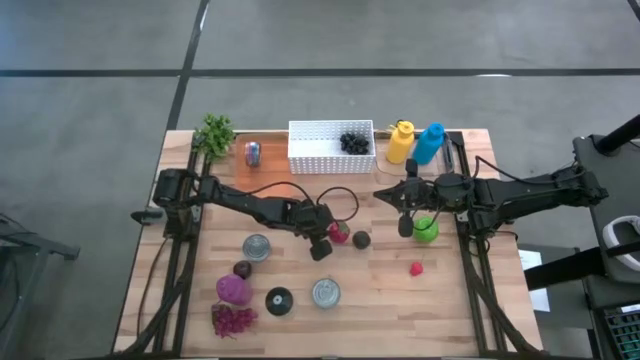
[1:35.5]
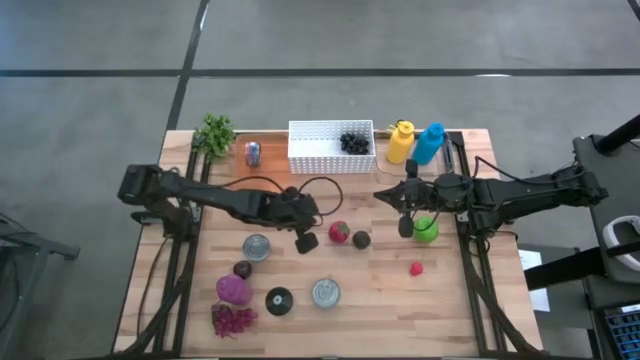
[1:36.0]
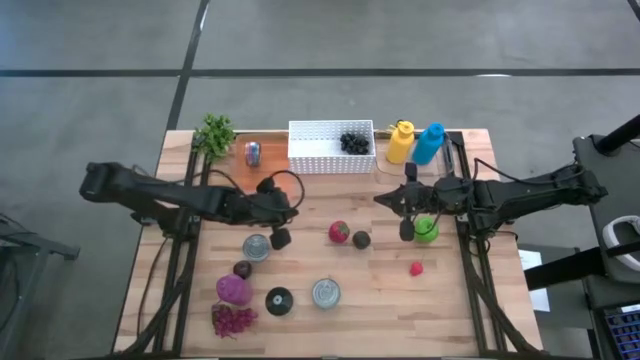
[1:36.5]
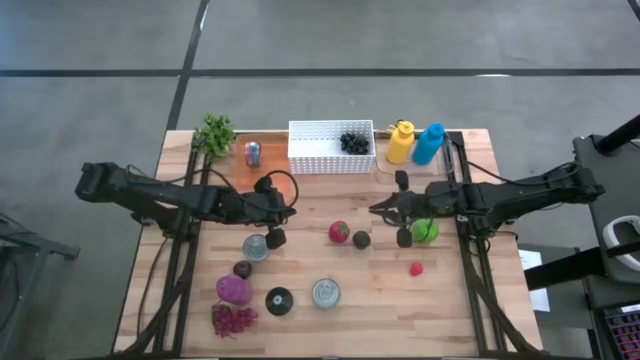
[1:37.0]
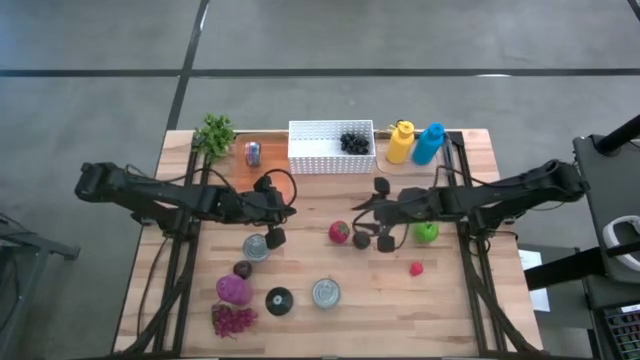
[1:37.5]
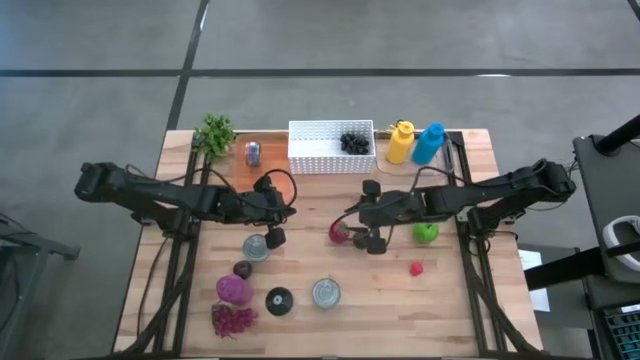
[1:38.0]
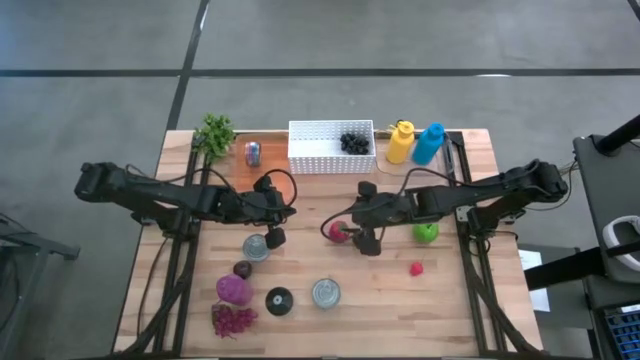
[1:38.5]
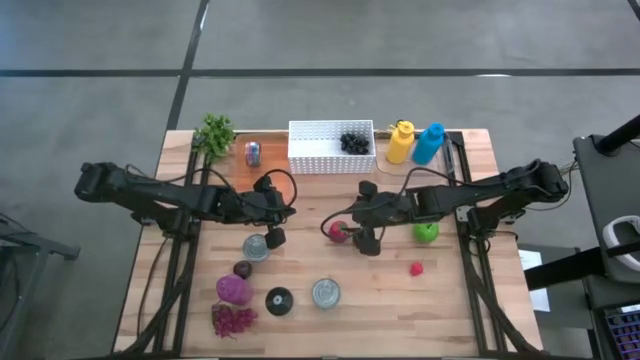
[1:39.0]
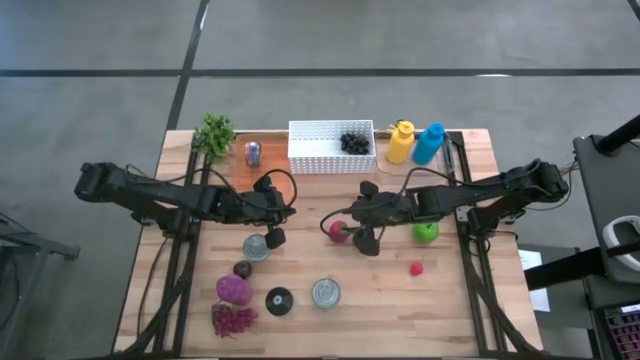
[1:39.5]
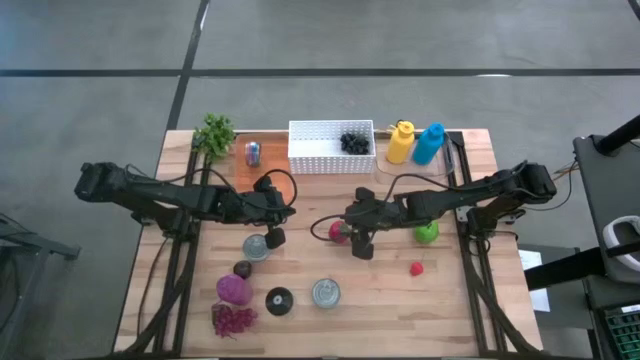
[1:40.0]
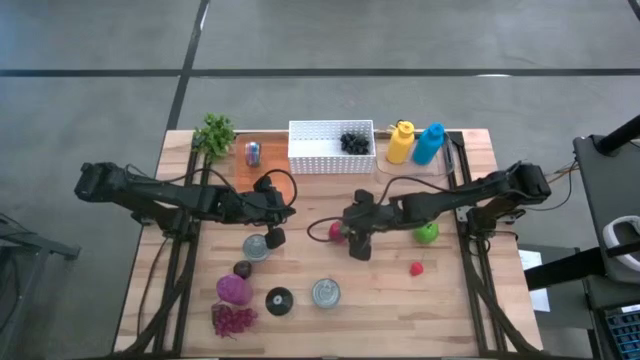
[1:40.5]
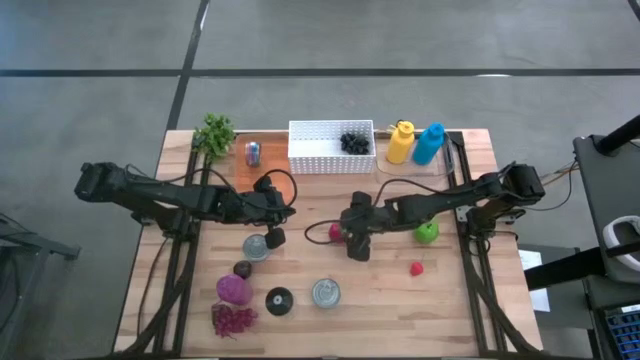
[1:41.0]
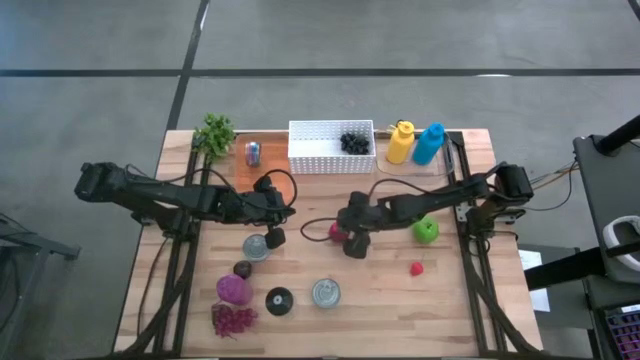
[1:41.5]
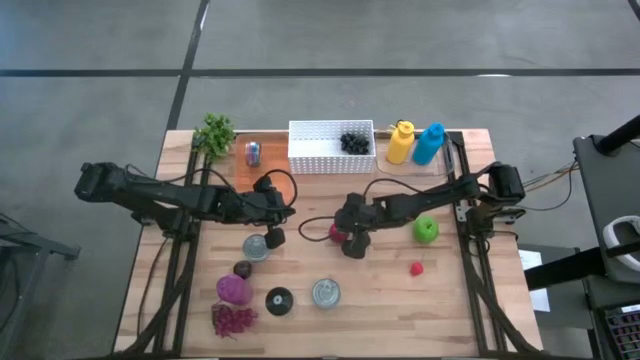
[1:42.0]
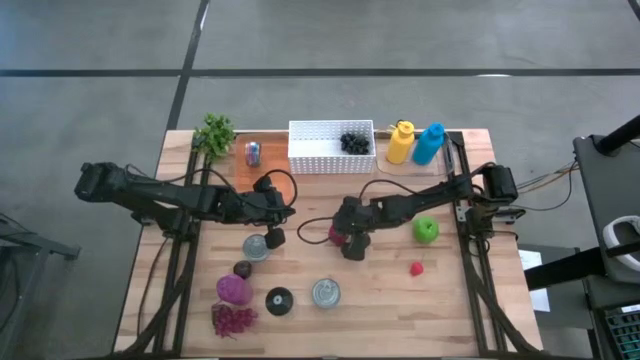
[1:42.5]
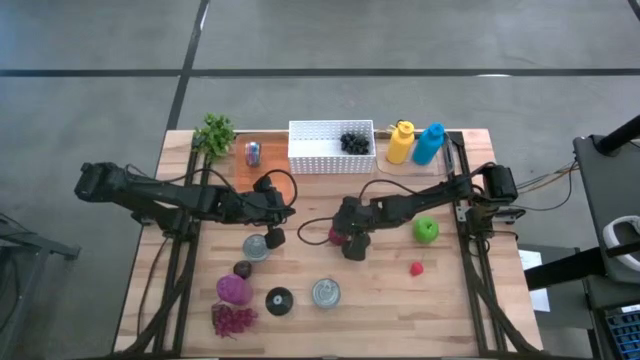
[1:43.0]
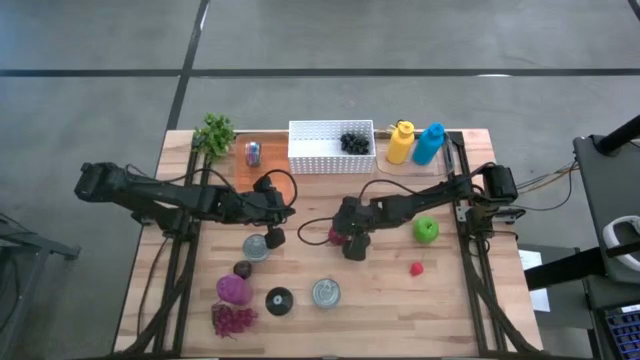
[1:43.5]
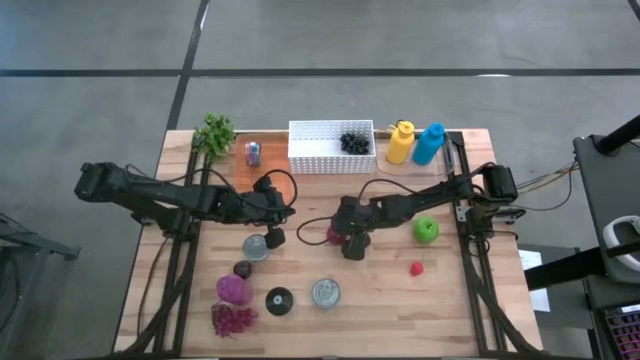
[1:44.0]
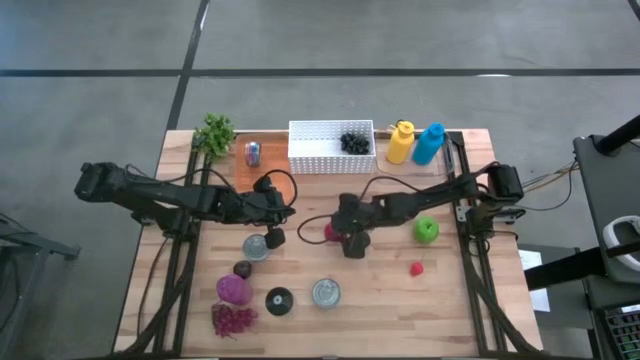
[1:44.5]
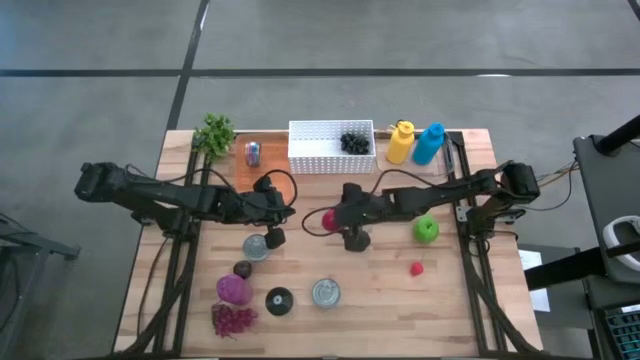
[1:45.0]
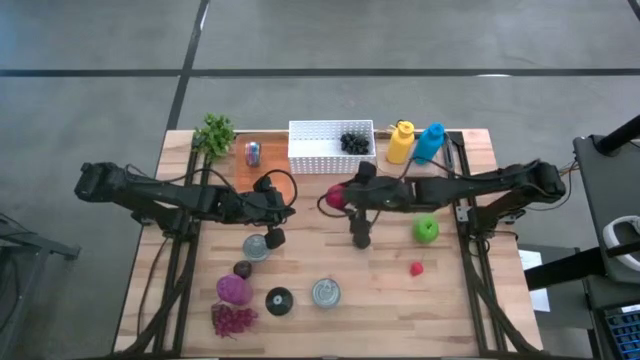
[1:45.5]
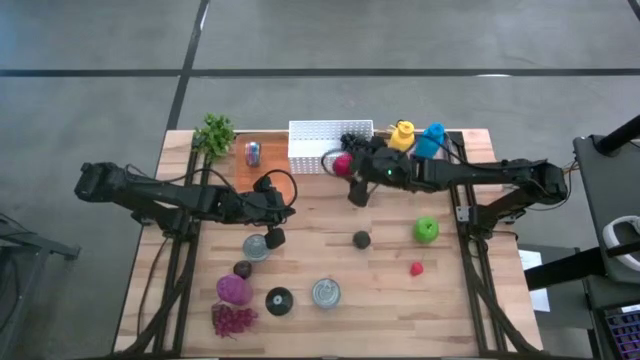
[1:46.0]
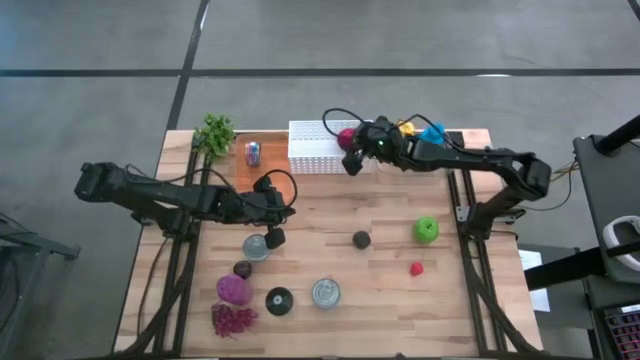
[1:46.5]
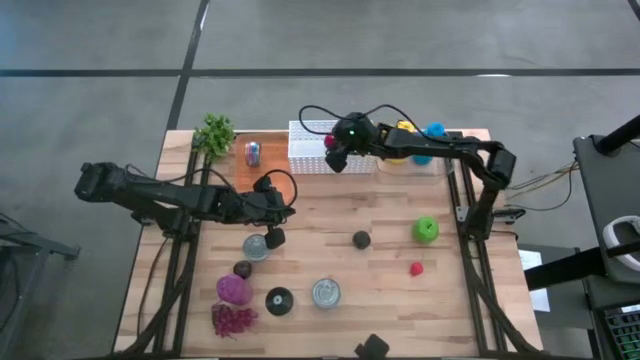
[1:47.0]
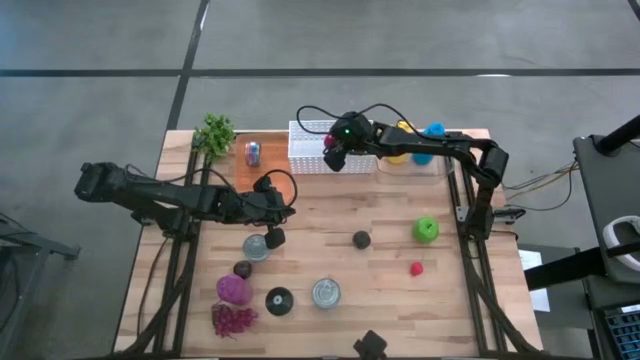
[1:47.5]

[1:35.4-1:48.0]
Task: Pick & Place Food Item
Put the tomato into the white bin

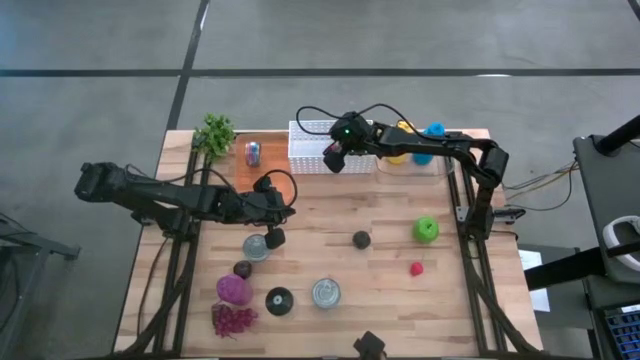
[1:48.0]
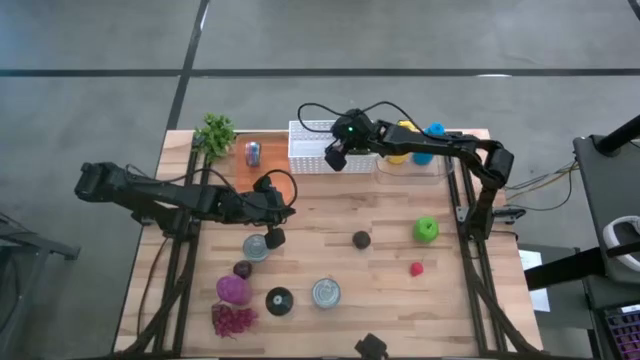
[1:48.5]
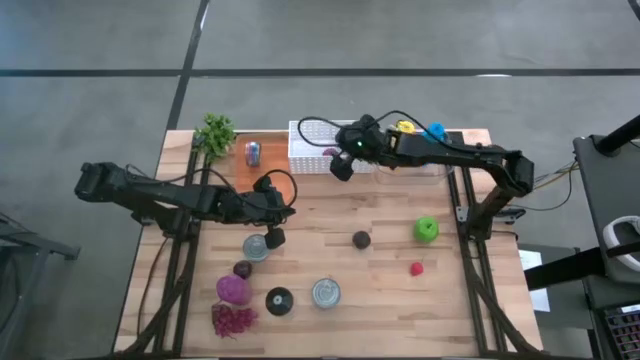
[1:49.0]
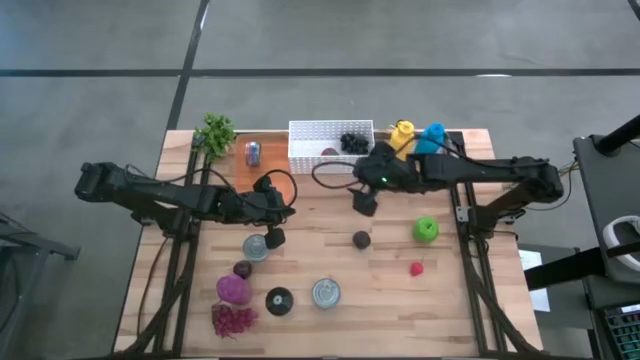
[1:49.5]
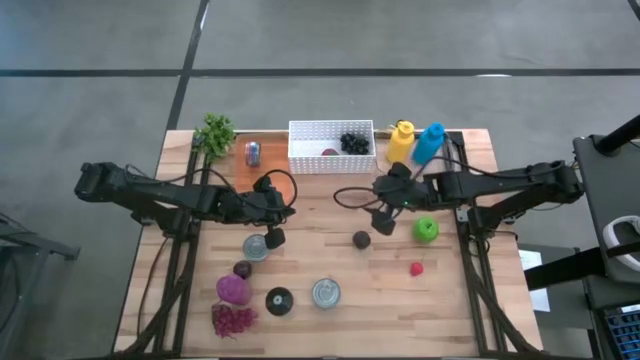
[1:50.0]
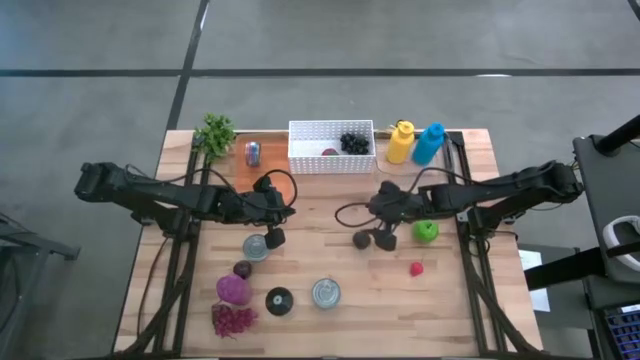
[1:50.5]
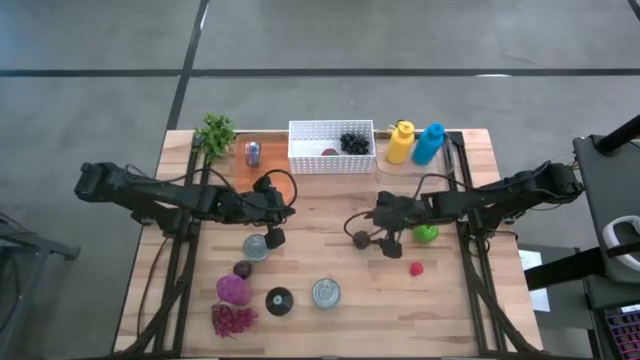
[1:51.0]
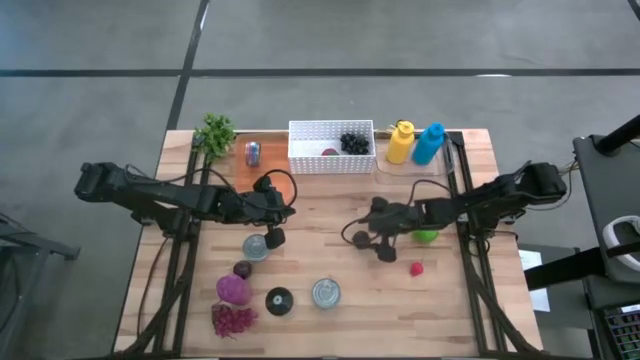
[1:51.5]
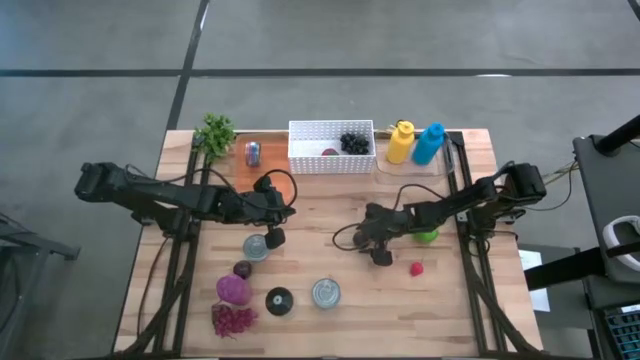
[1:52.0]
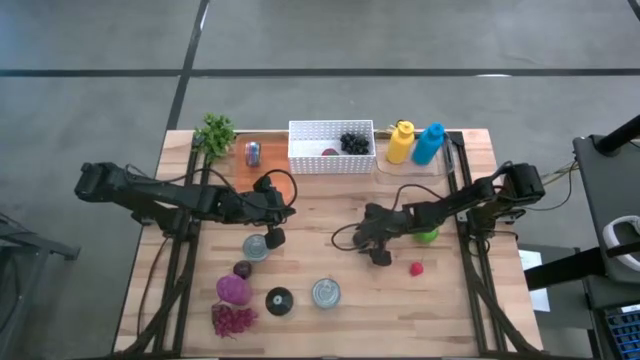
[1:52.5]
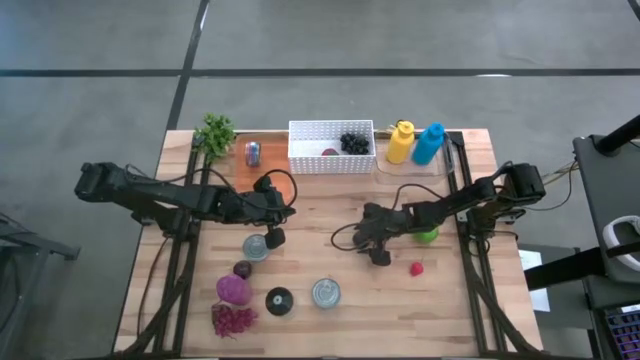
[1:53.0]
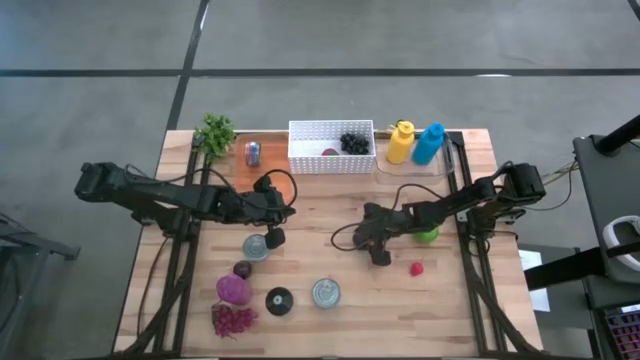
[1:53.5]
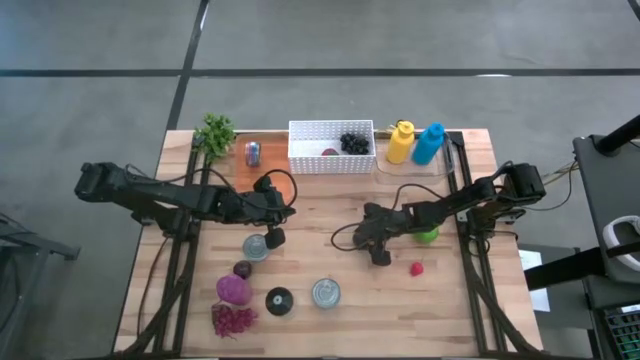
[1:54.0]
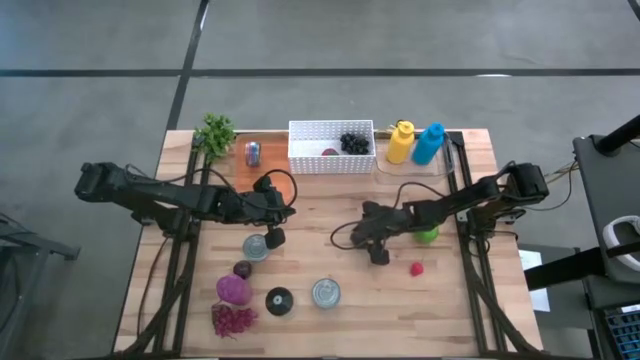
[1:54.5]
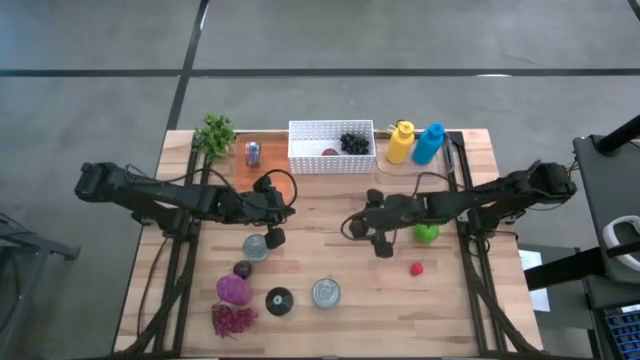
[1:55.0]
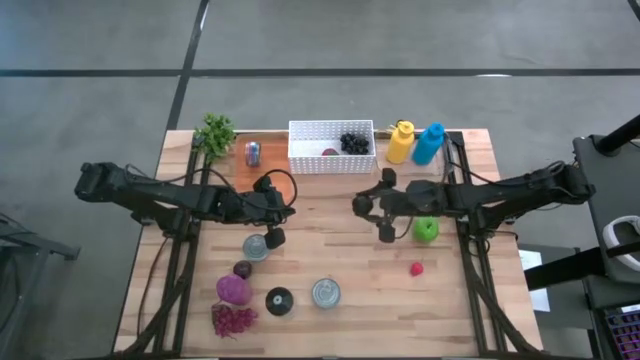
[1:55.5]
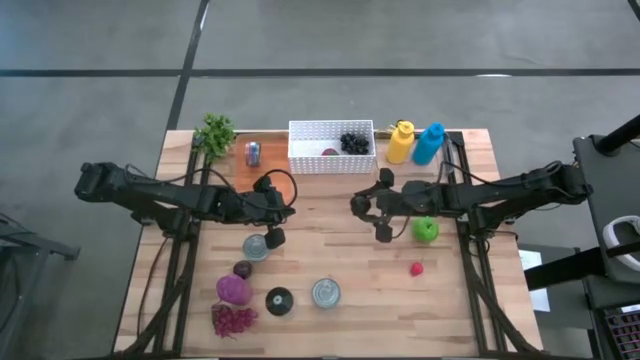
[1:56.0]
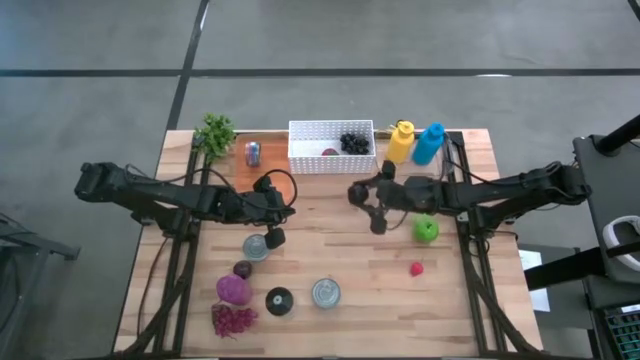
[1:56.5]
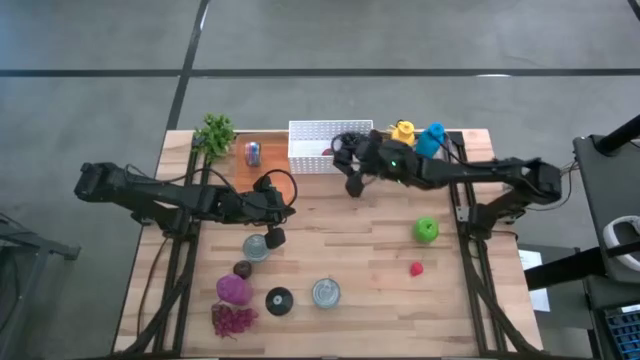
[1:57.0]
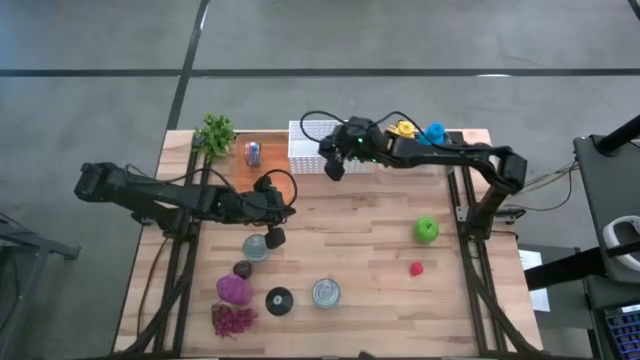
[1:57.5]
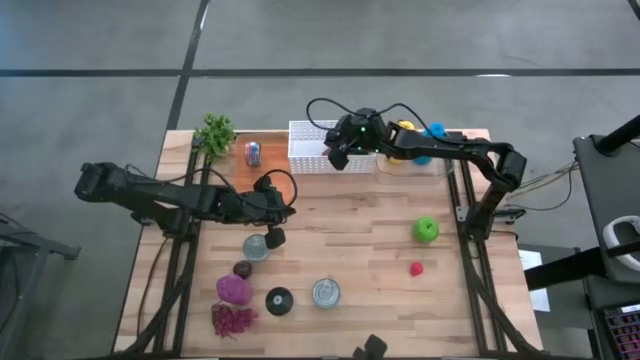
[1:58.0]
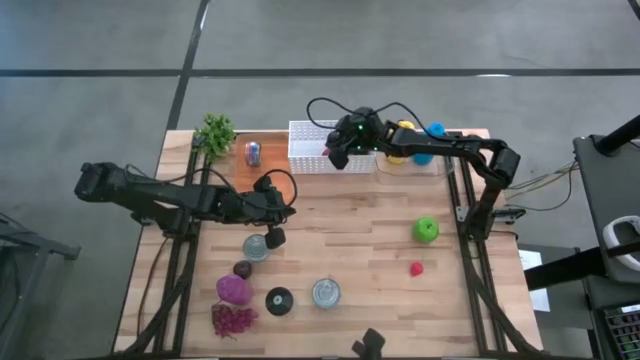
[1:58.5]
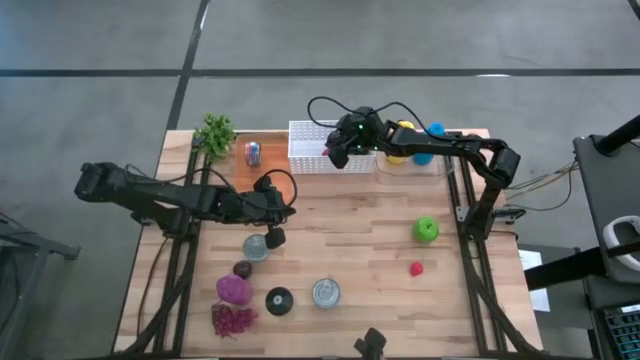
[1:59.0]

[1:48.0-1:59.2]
Put the right plum into the white bin
